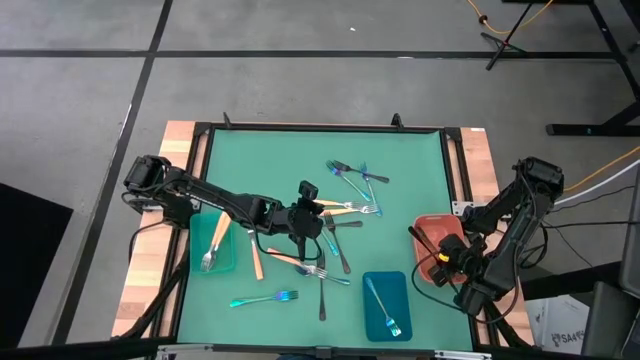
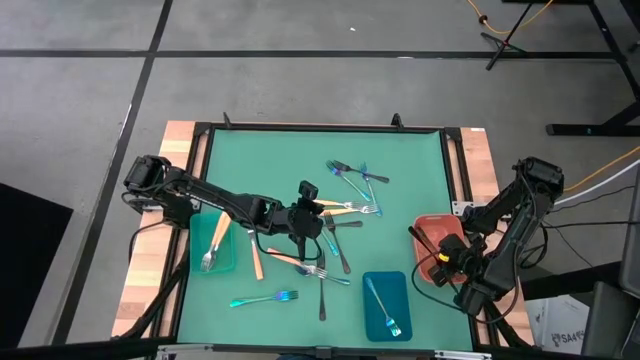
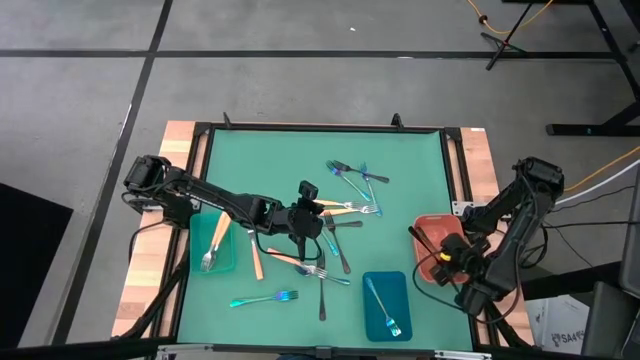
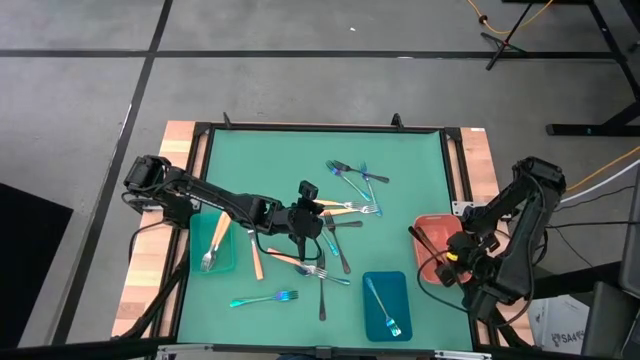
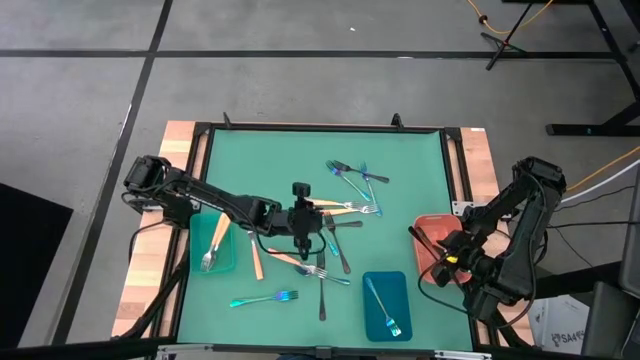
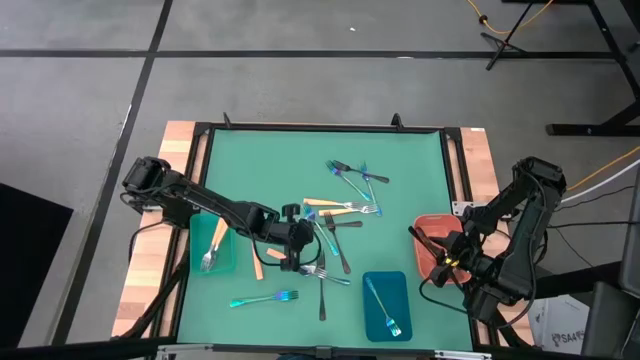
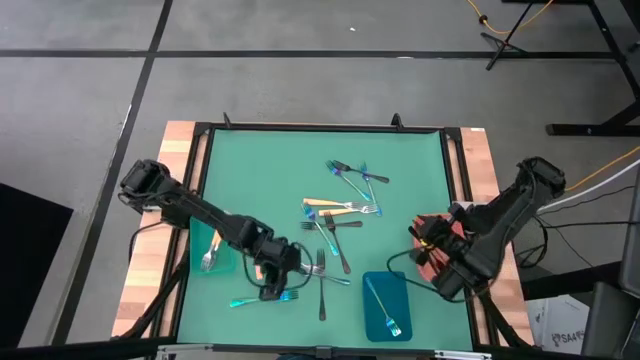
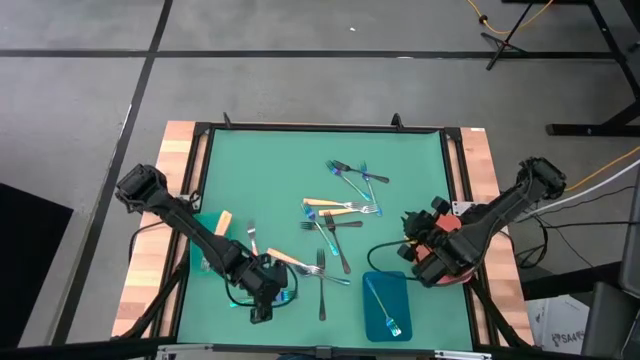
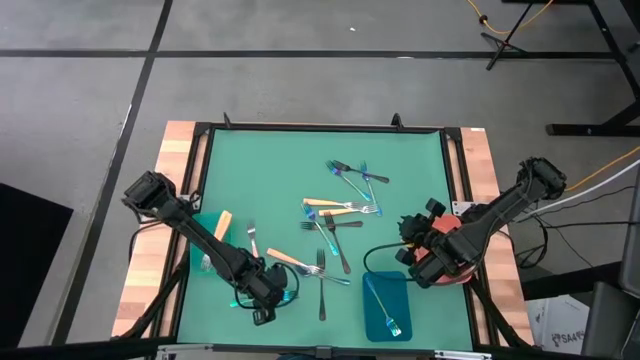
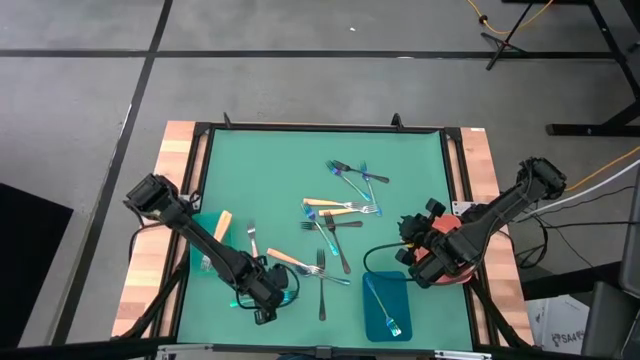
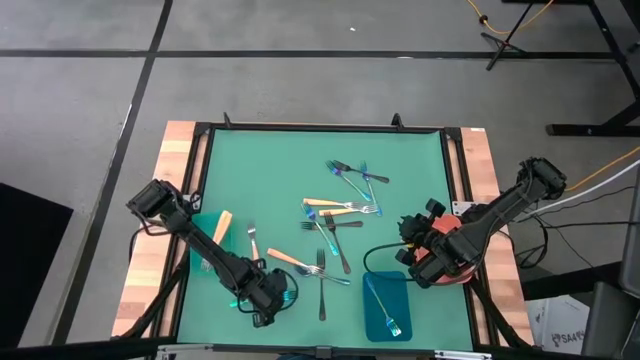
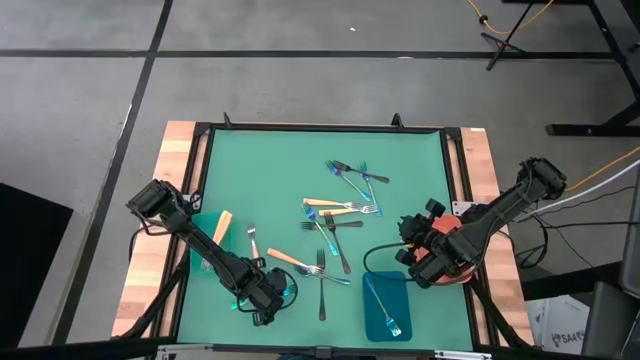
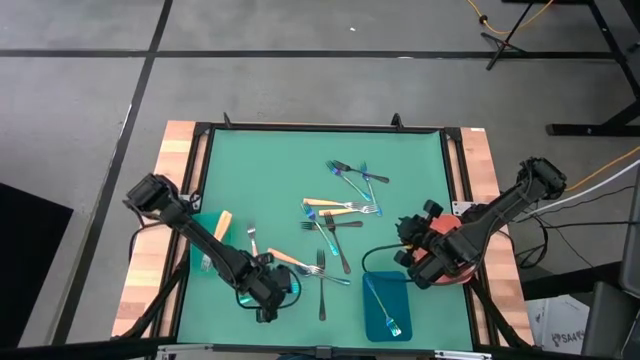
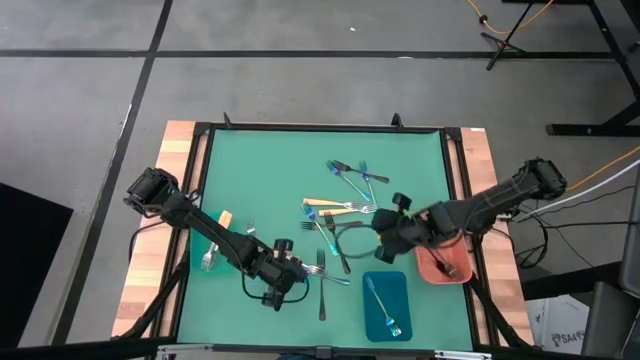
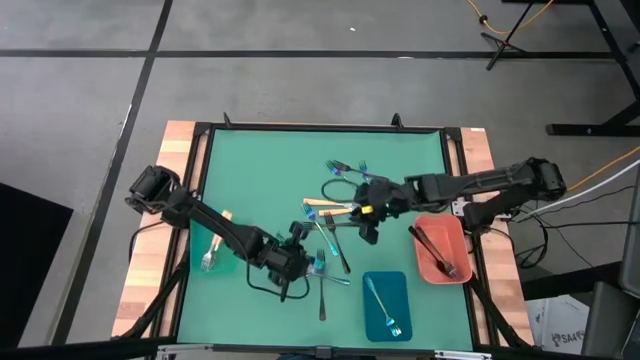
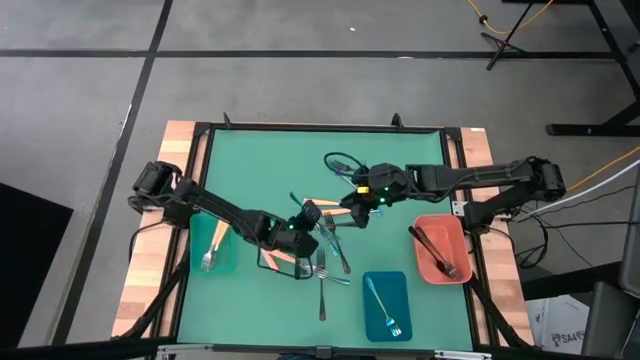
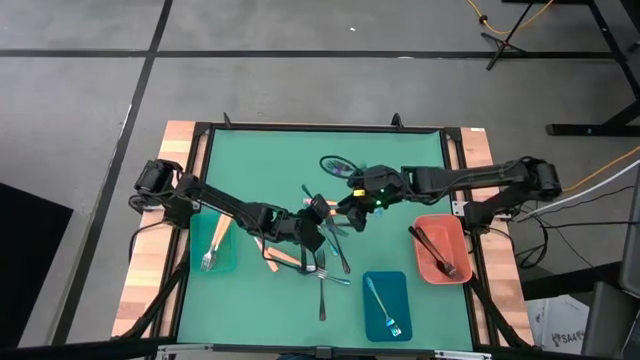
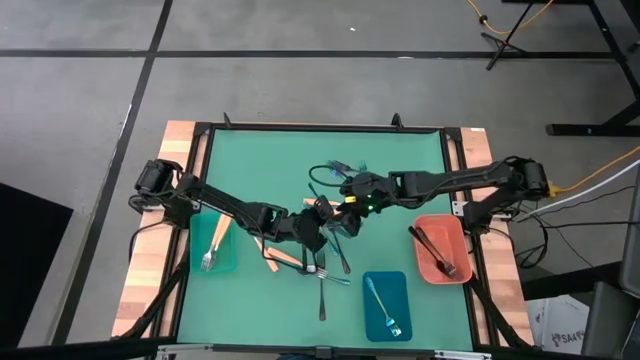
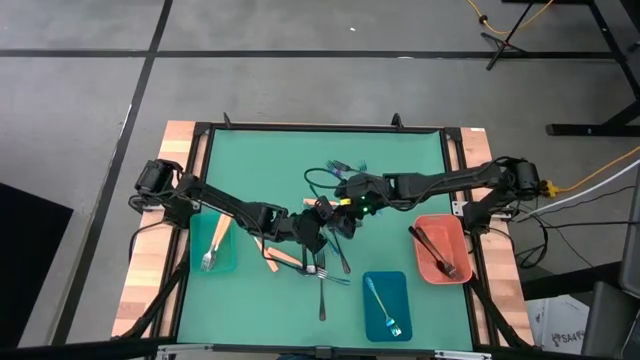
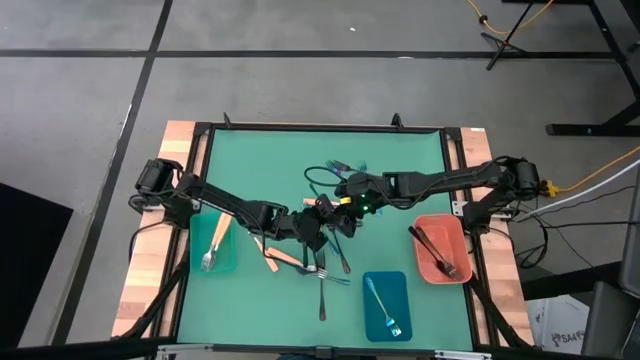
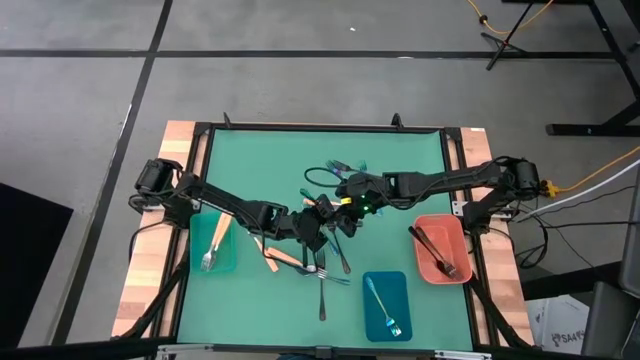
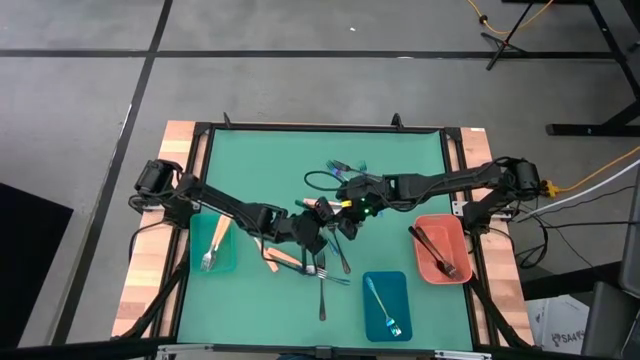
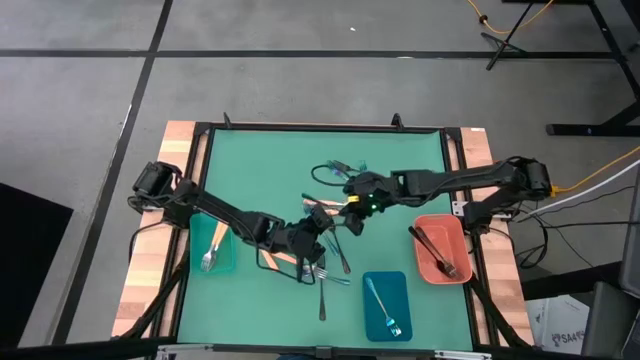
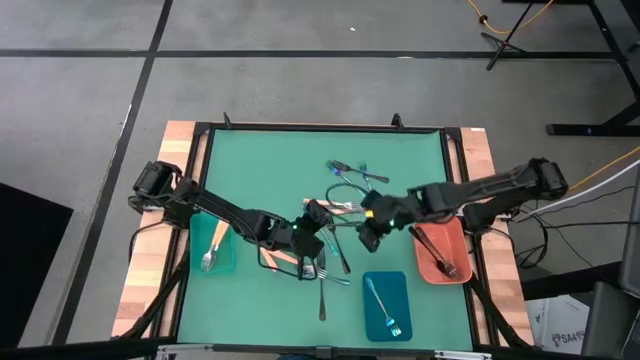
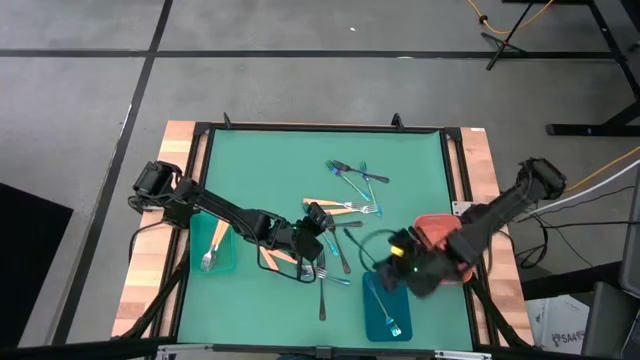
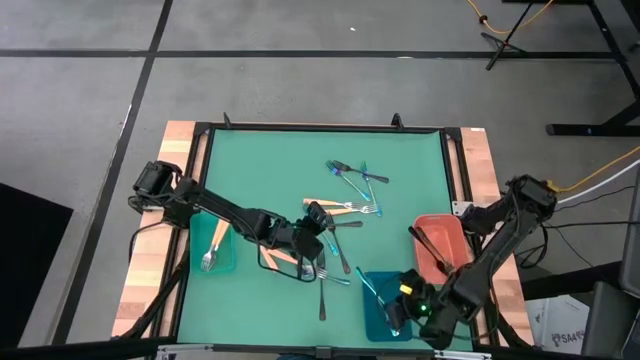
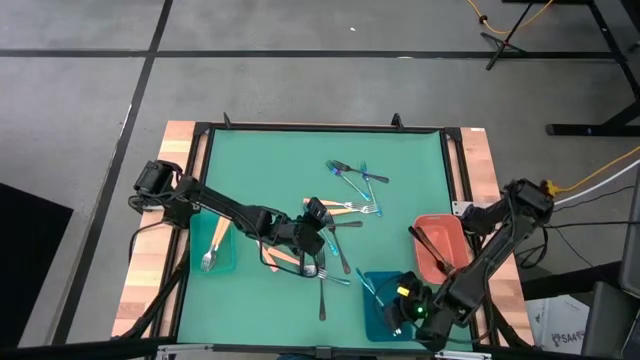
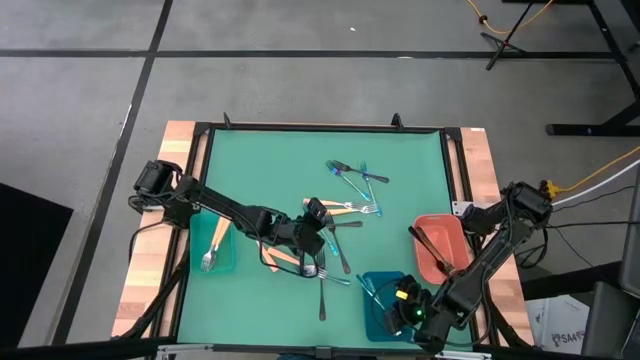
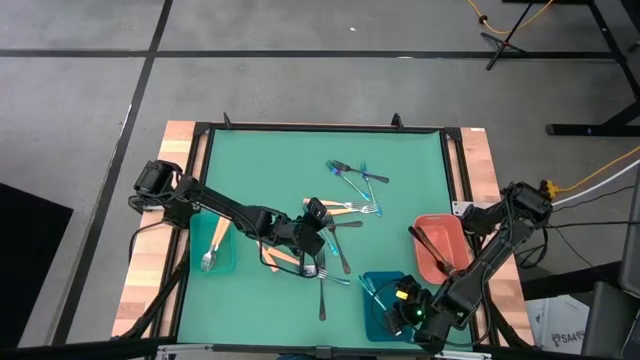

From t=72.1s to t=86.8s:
Task: Sort silverware by color (type)
Put the blue fork into the blue bin
